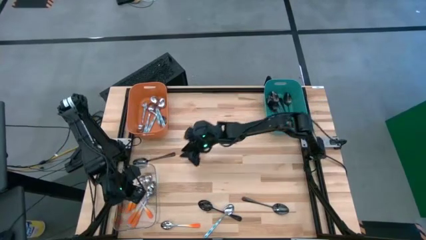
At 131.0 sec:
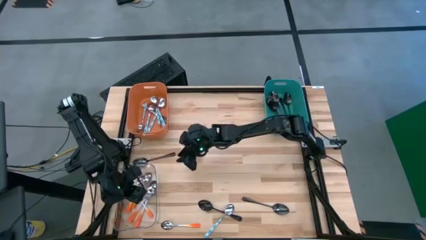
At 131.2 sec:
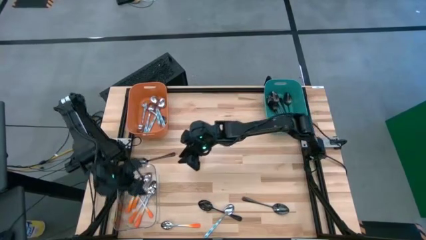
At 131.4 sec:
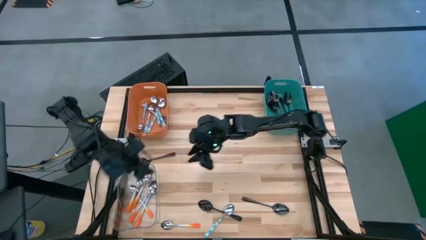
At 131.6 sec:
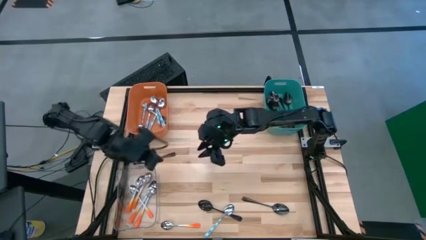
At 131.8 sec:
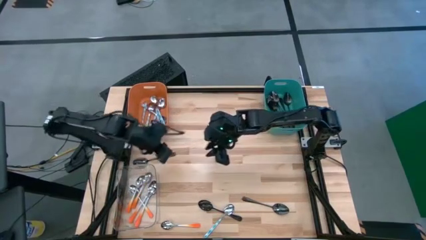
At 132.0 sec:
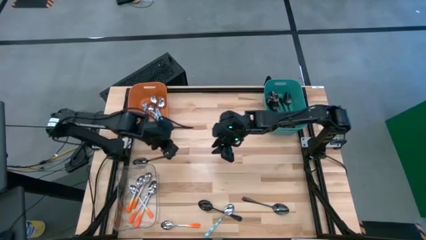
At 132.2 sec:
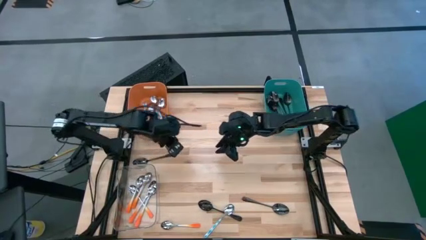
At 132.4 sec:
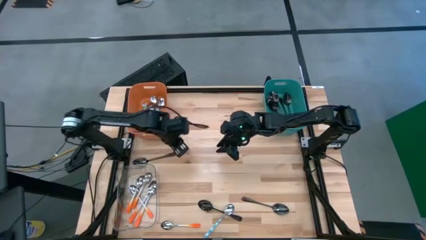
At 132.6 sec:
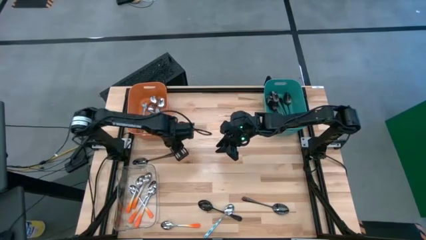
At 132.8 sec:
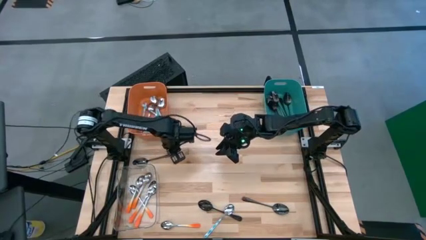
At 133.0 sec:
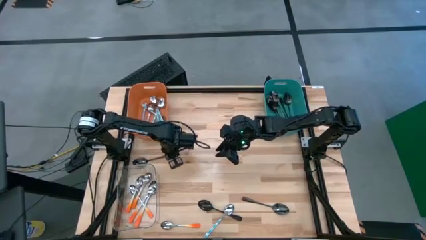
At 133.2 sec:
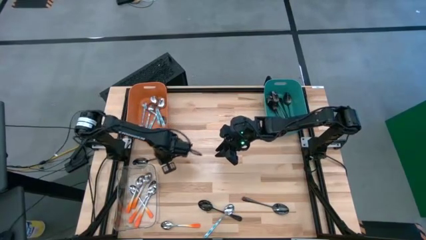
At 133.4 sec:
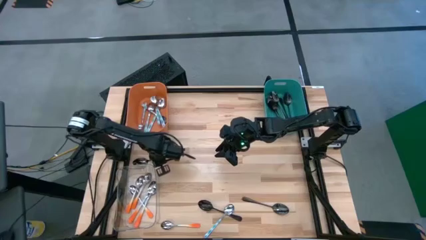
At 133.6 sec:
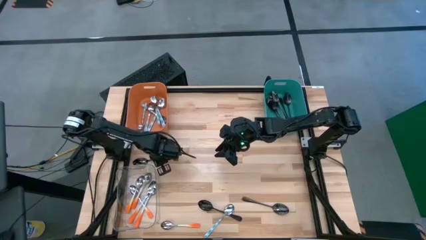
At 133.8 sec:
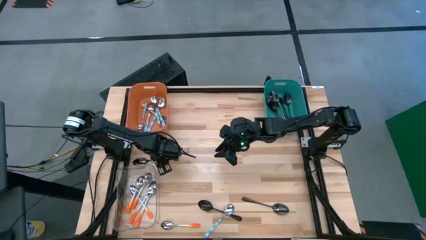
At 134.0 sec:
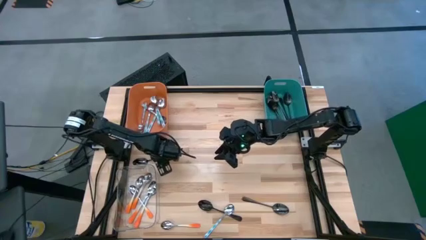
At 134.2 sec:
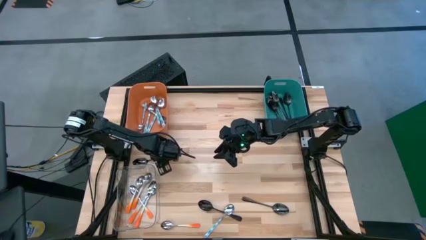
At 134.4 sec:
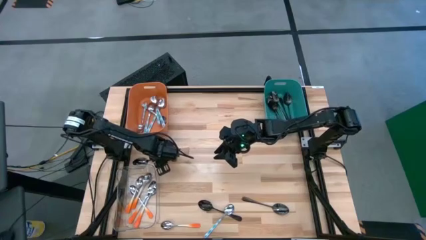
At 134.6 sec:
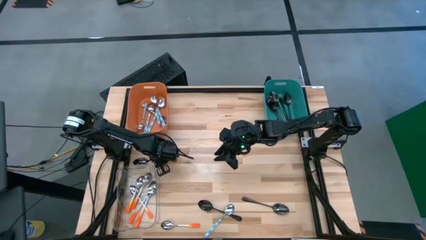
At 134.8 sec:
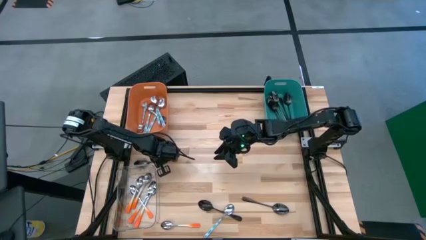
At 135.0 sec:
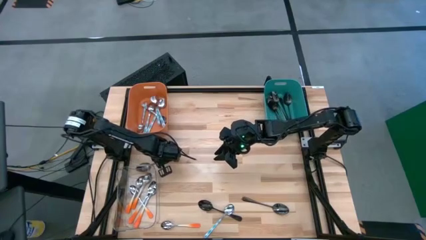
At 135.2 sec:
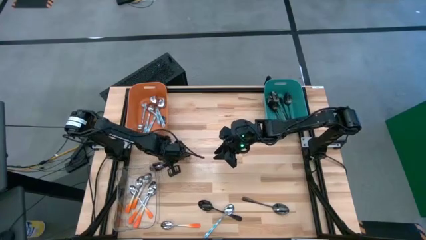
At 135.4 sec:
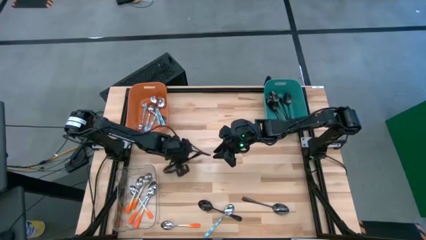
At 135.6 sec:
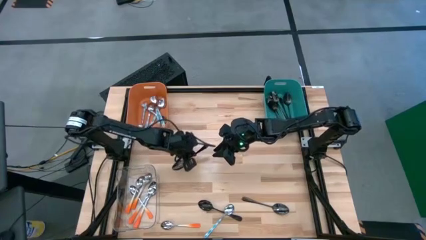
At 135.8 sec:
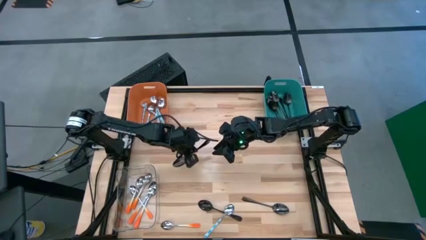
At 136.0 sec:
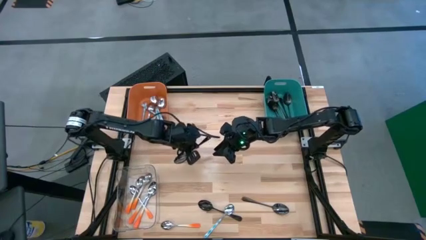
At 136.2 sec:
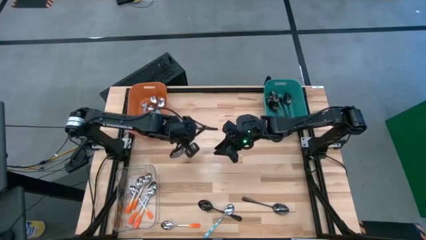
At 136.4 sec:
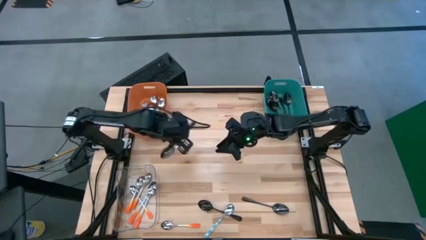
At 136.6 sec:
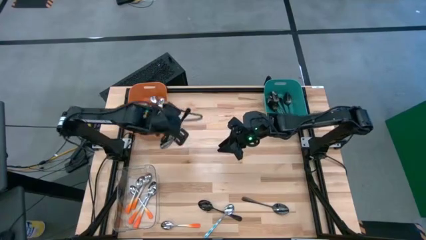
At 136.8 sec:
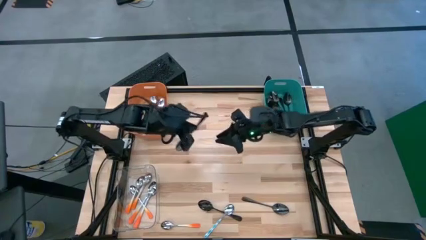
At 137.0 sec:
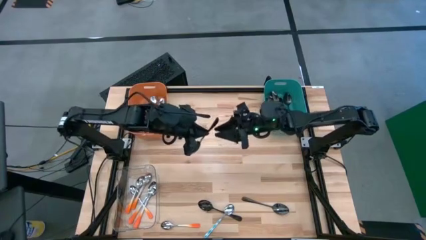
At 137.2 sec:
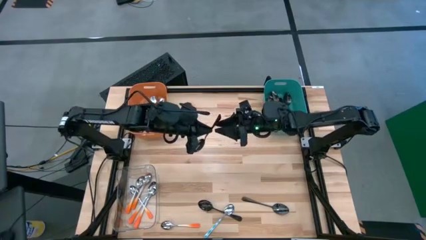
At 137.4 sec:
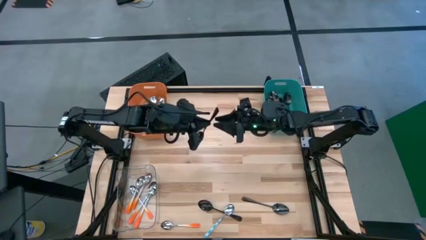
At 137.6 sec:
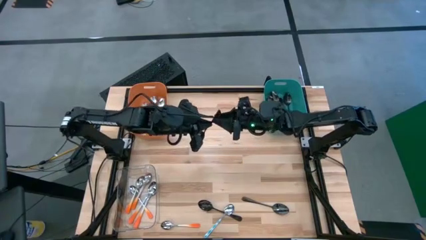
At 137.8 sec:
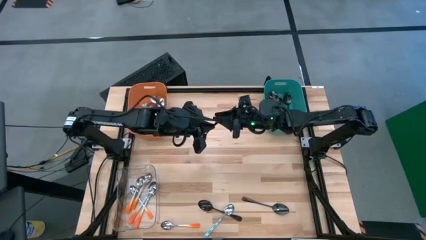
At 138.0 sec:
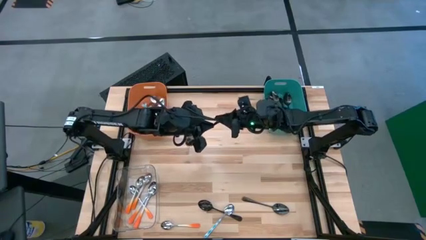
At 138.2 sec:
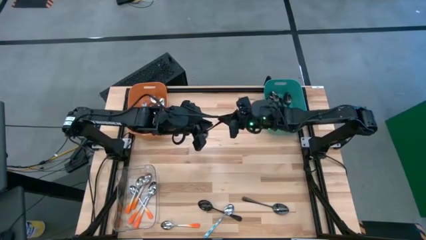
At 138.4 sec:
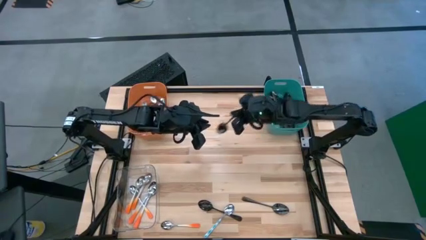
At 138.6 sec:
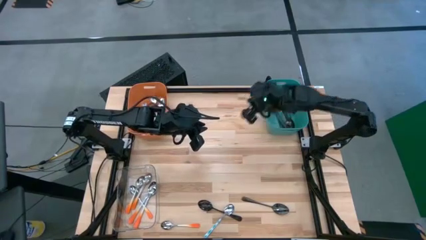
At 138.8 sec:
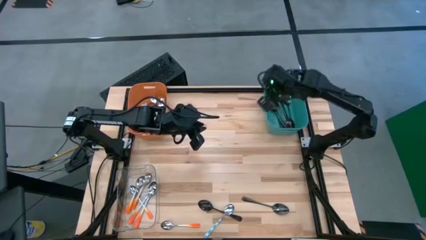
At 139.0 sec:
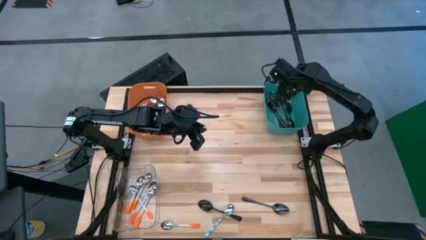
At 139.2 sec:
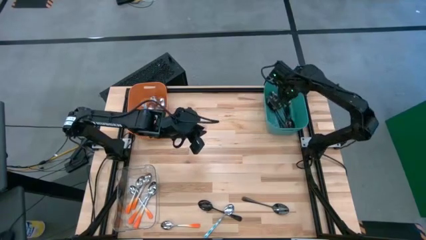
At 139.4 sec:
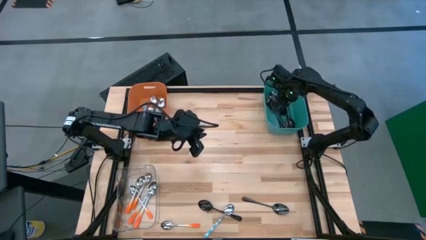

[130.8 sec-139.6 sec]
Task: Sort silverware by color (type)
Put the black spoon into the green bin

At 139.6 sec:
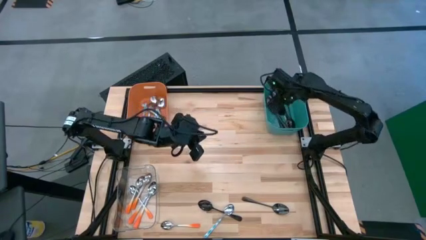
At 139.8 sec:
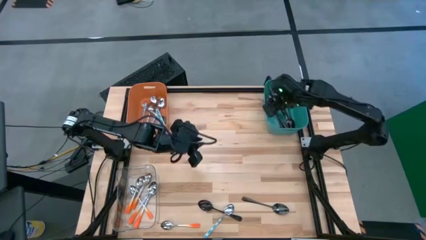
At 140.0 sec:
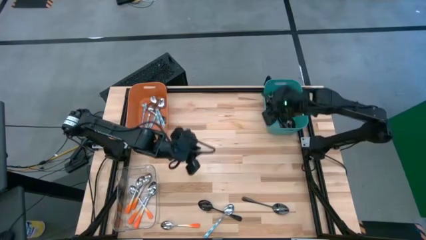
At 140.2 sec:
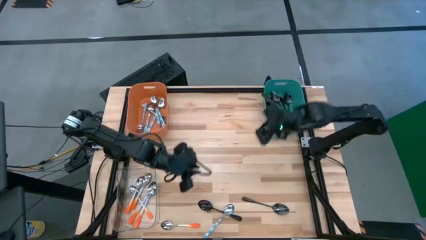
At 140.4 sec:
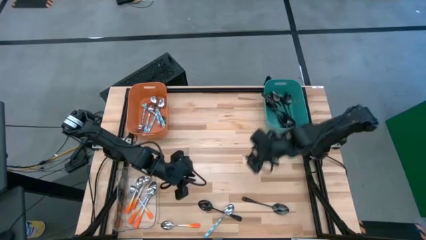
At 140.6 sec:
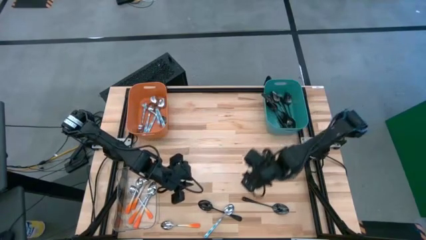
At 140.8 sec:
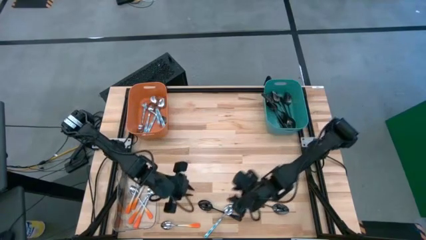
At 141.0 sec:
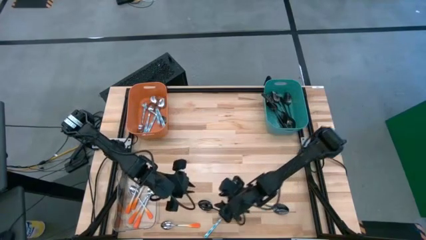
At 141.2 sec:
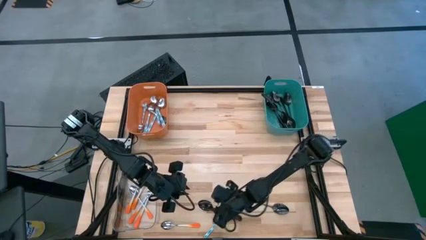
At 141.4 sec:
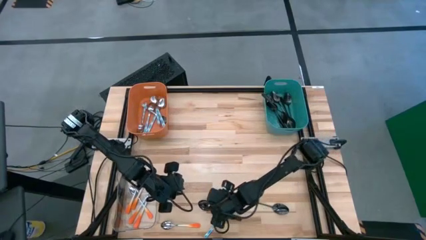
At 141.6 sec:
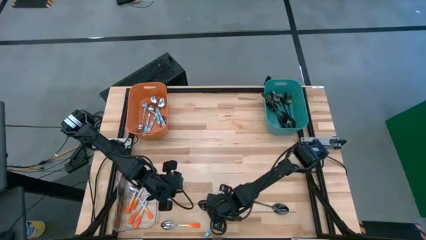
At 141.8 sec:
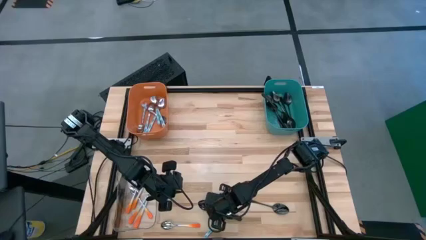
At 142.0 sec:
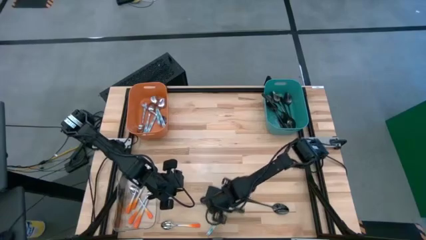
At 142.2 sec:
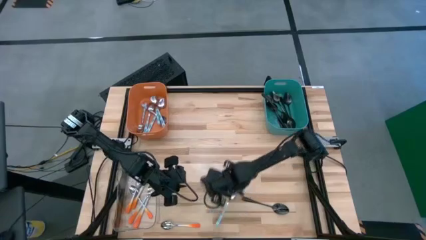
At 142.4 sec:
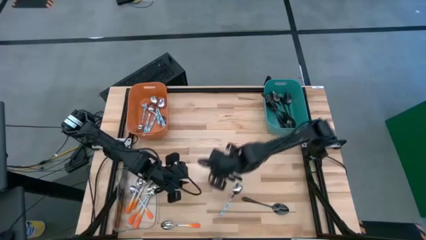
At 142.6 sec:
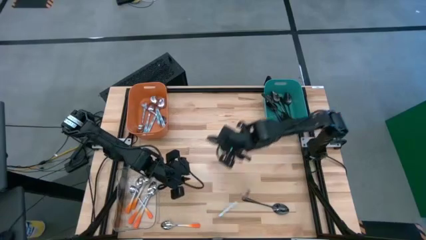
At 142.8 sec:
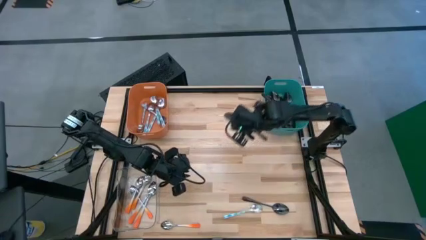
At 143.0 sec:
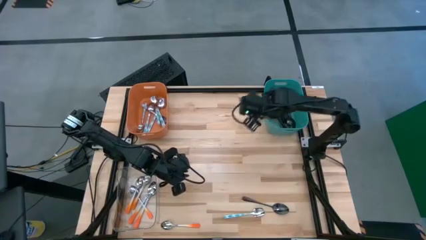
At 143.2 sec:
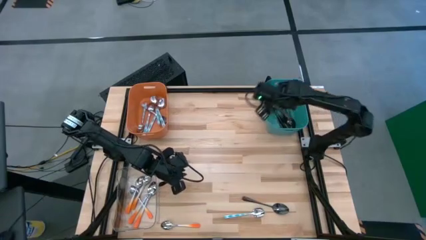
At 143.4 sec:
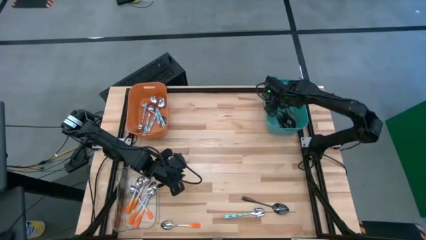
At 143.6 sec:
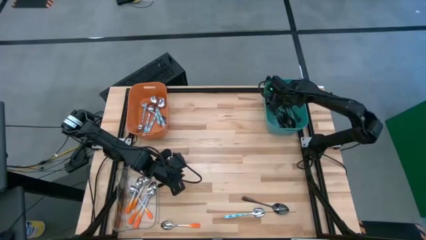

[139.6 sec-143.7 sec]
Put the black spoon into the green bin

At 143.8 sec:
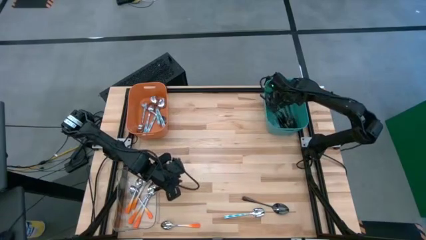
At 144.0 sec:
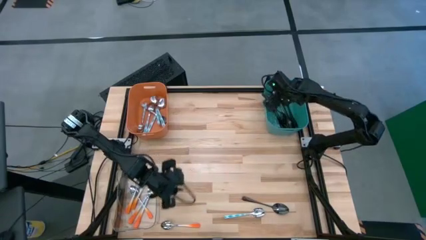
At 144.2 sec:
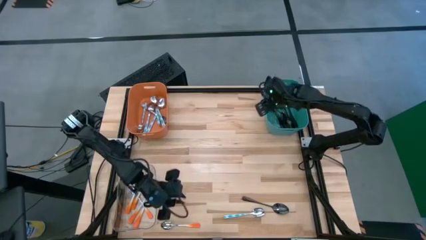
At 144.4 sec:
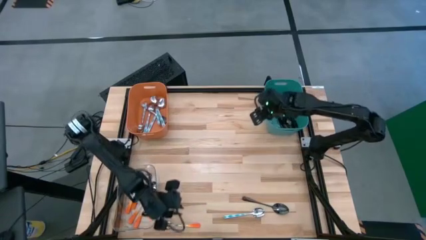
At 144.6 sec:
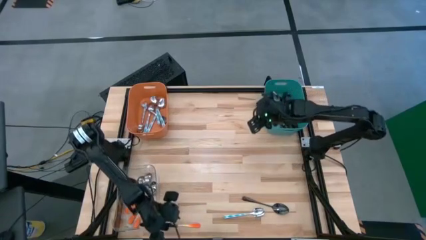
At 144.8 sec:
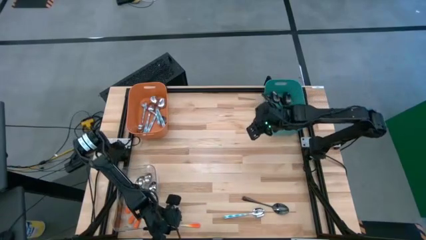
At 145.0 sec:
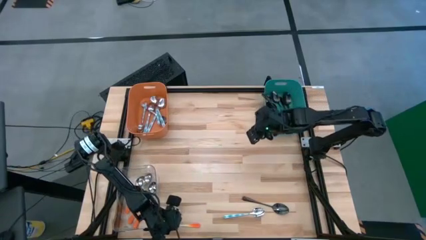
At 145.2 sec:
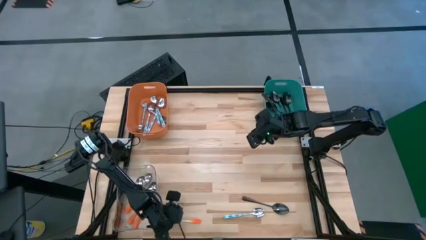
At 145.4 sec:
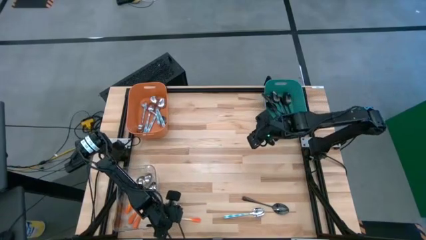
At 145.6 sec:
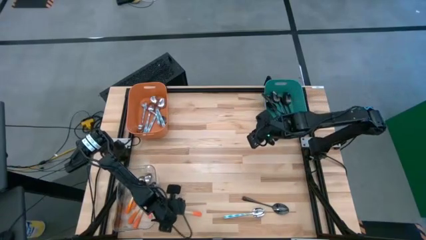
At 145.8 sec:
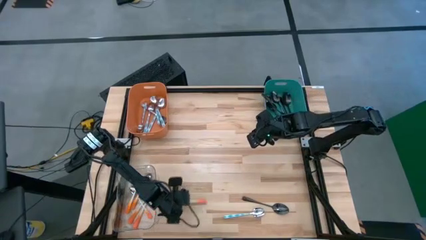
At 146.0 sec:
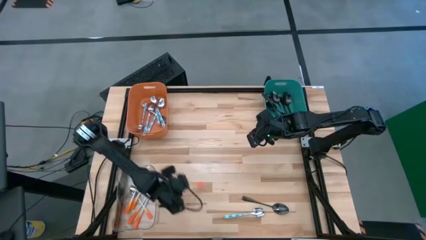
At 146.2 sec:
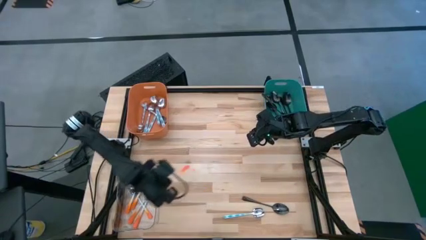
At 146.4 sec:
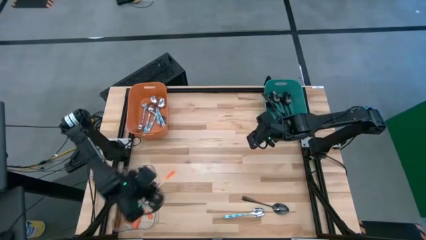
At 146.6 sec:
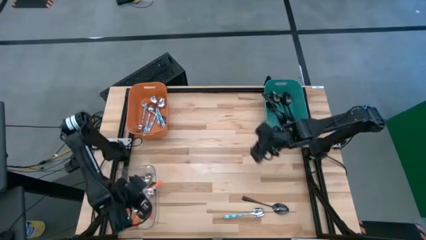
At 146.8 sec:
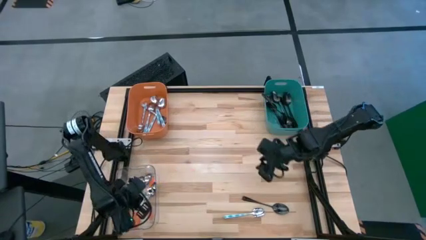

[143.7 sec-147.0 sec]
Put the orange spoon into the transparent bin
